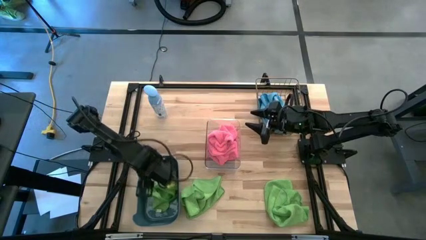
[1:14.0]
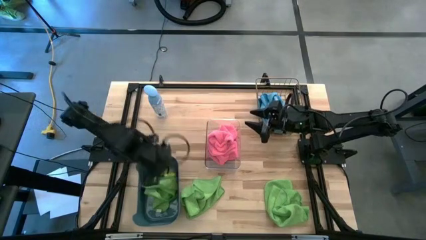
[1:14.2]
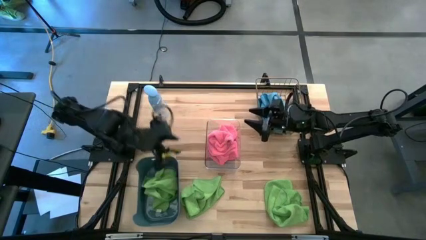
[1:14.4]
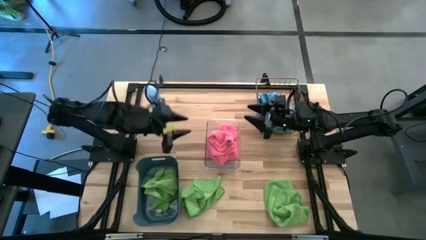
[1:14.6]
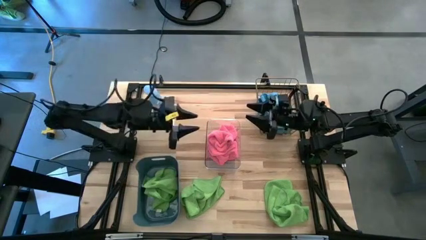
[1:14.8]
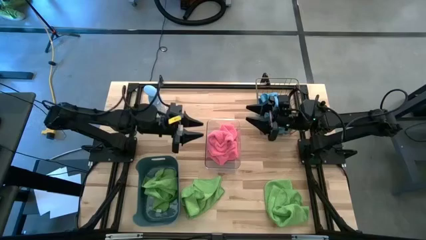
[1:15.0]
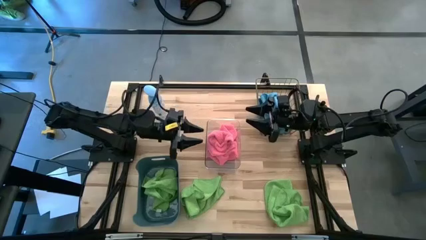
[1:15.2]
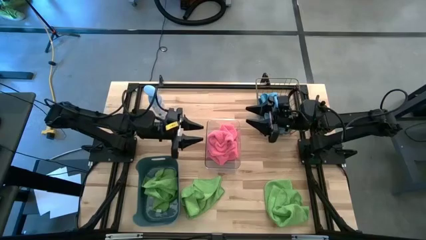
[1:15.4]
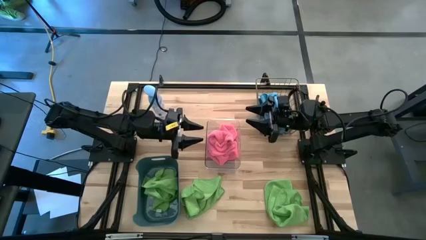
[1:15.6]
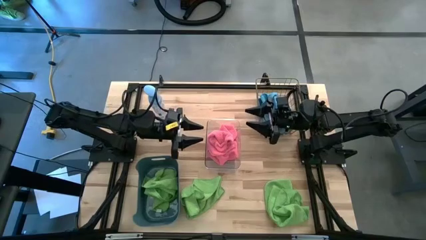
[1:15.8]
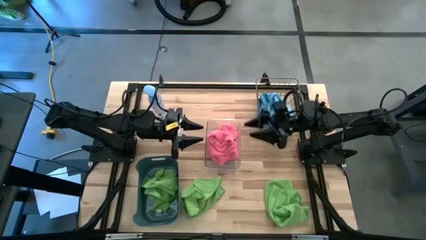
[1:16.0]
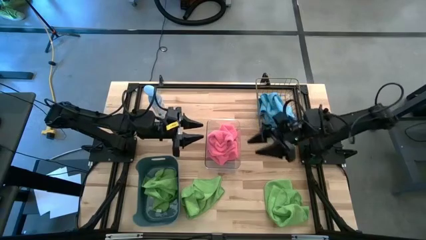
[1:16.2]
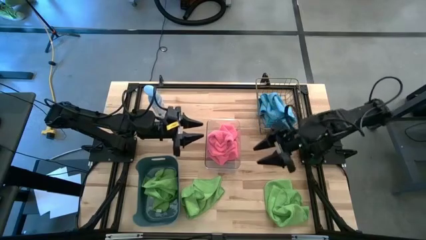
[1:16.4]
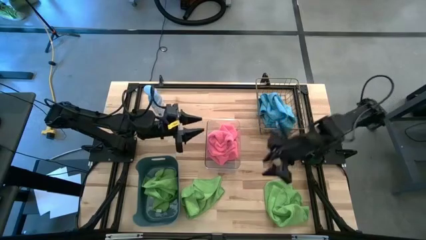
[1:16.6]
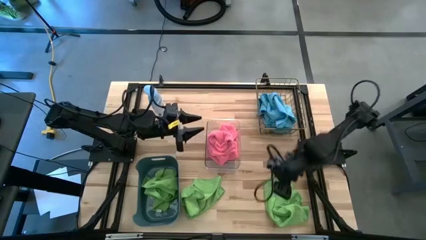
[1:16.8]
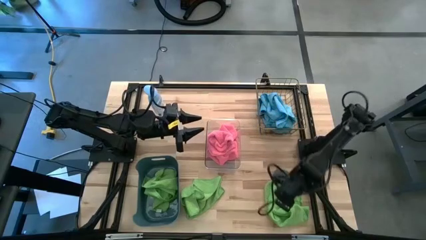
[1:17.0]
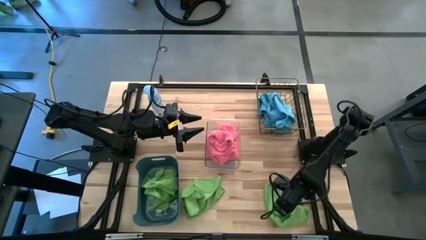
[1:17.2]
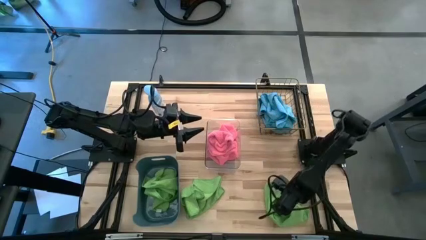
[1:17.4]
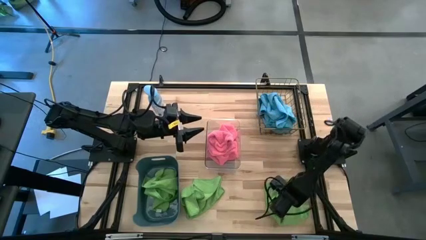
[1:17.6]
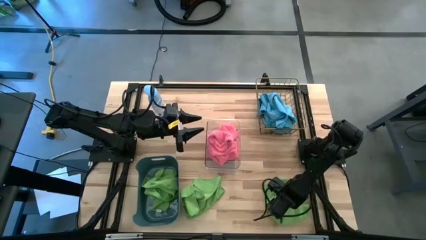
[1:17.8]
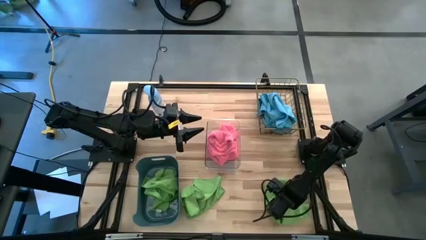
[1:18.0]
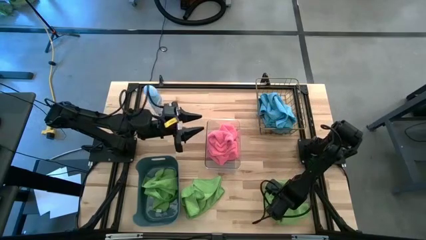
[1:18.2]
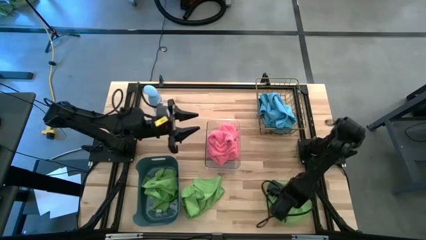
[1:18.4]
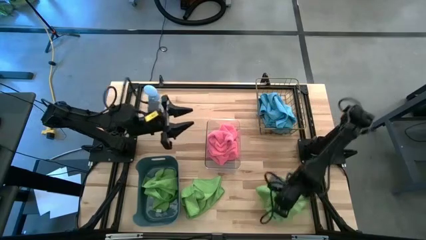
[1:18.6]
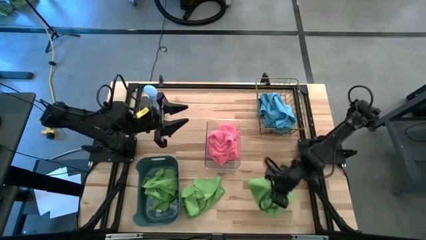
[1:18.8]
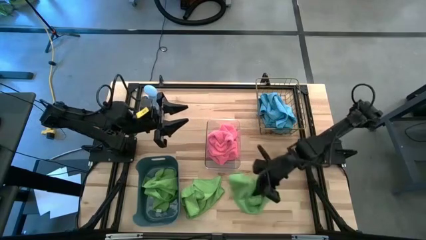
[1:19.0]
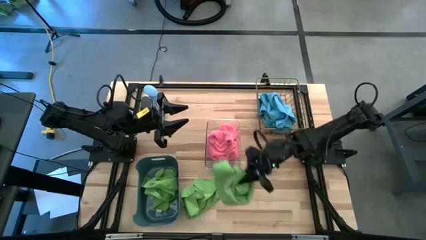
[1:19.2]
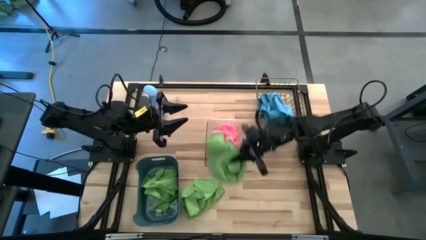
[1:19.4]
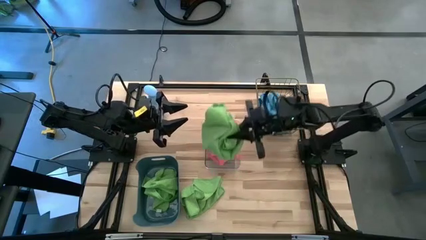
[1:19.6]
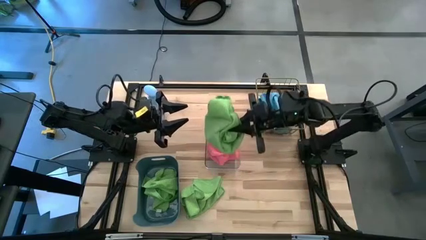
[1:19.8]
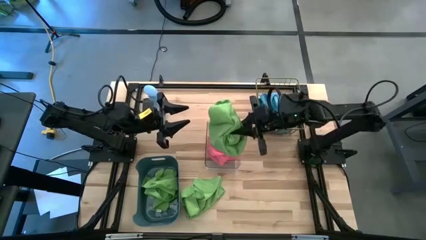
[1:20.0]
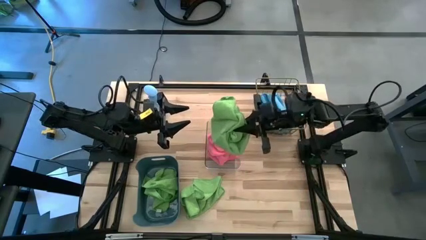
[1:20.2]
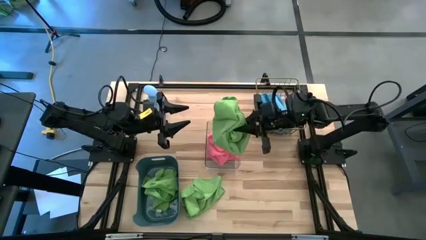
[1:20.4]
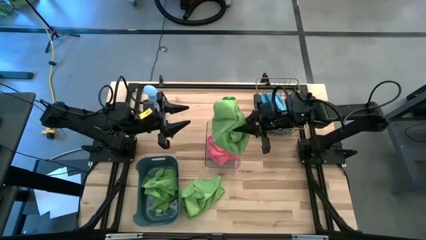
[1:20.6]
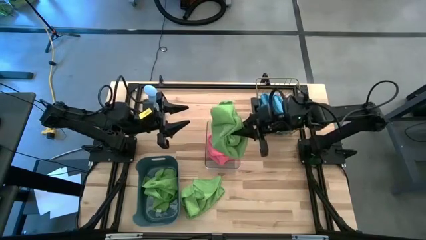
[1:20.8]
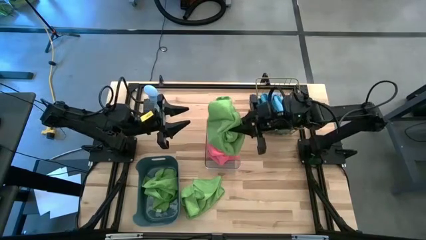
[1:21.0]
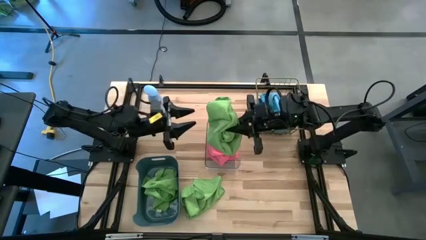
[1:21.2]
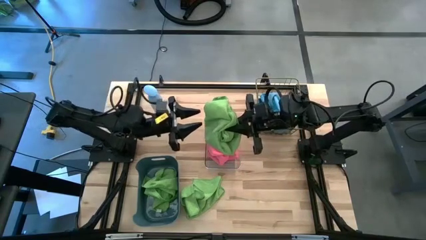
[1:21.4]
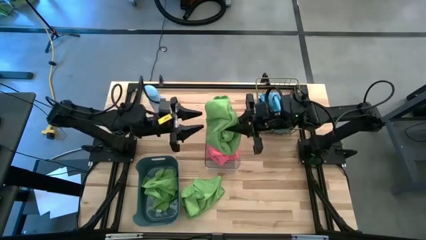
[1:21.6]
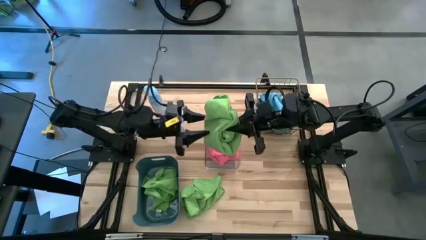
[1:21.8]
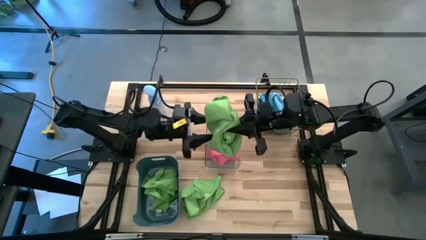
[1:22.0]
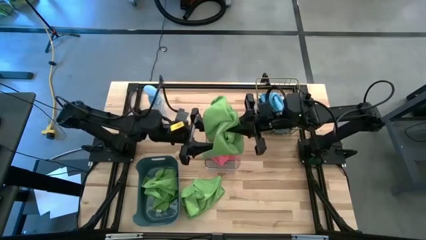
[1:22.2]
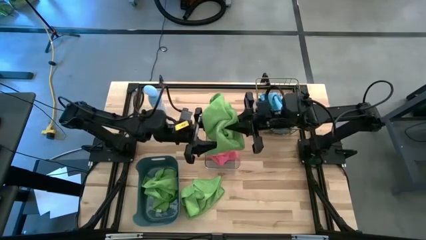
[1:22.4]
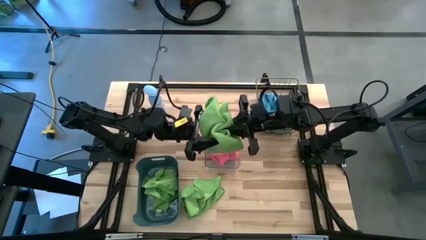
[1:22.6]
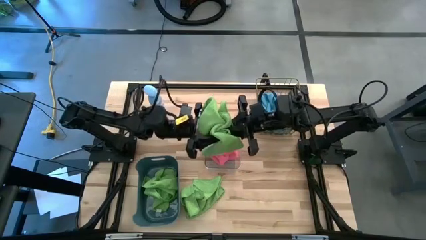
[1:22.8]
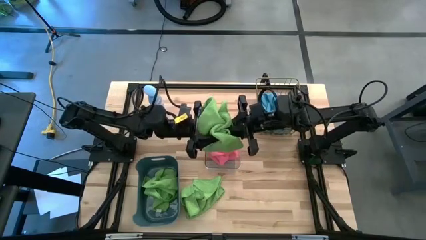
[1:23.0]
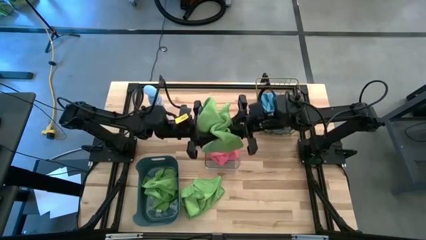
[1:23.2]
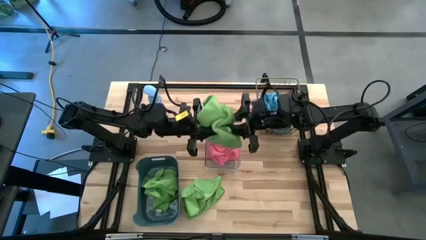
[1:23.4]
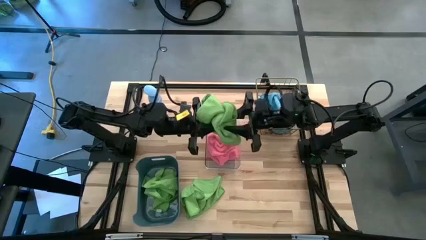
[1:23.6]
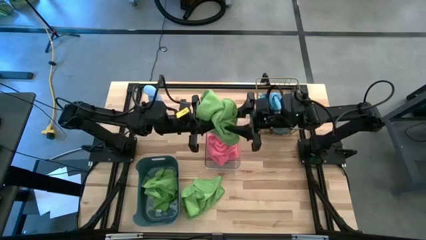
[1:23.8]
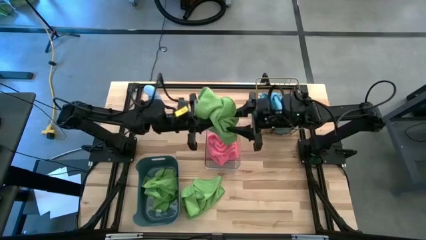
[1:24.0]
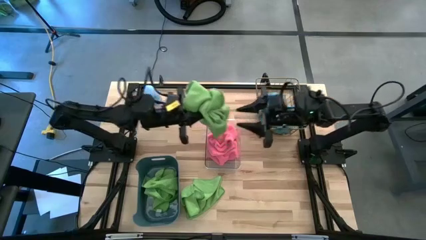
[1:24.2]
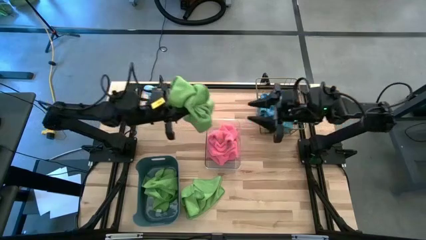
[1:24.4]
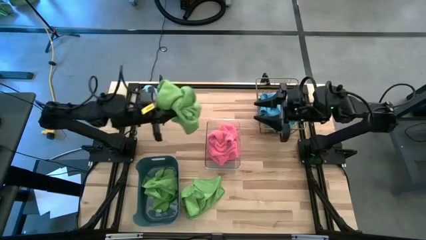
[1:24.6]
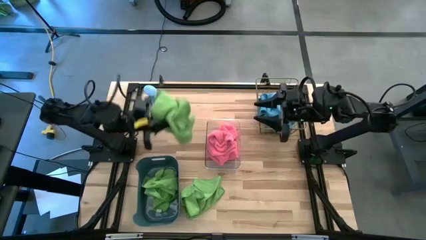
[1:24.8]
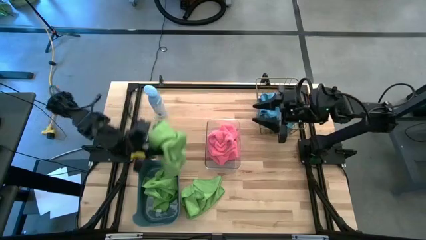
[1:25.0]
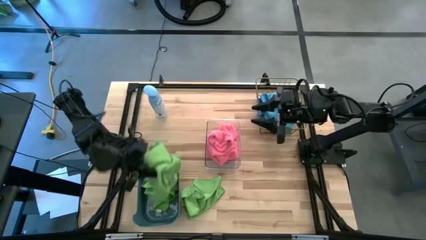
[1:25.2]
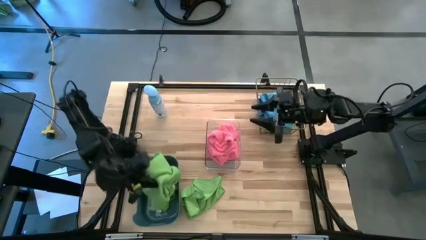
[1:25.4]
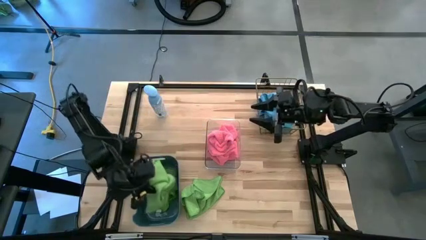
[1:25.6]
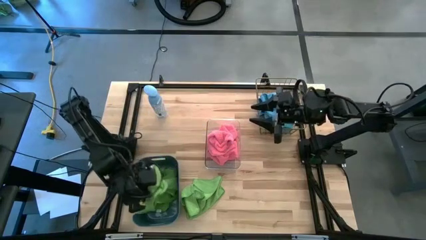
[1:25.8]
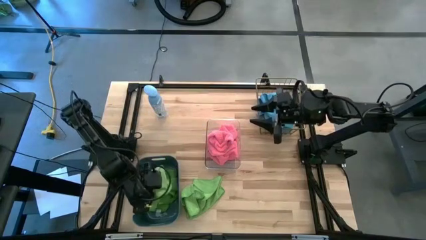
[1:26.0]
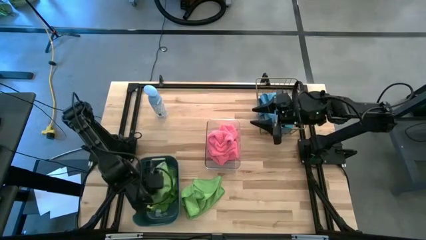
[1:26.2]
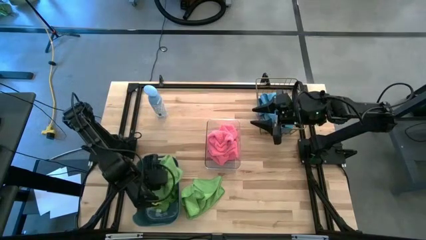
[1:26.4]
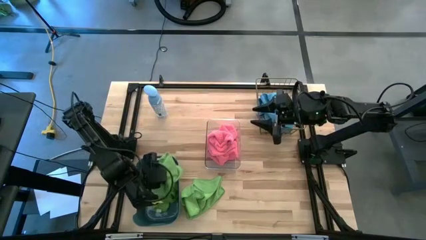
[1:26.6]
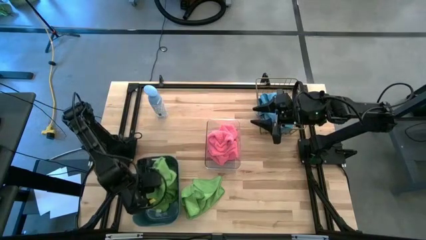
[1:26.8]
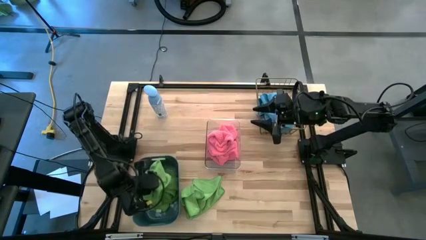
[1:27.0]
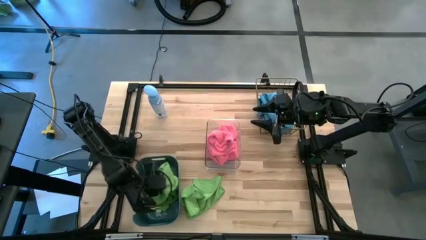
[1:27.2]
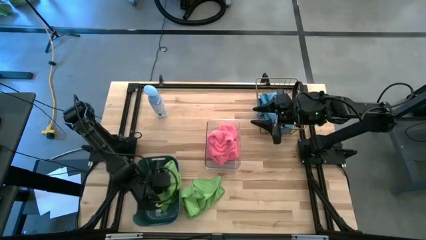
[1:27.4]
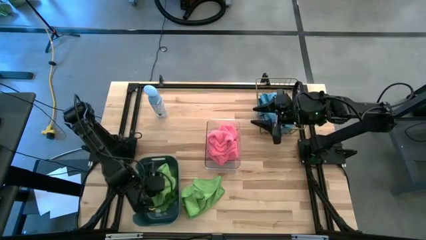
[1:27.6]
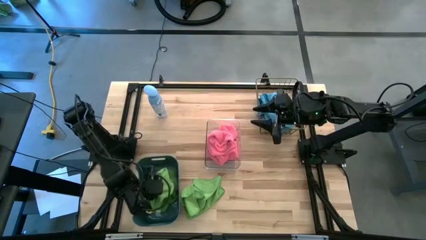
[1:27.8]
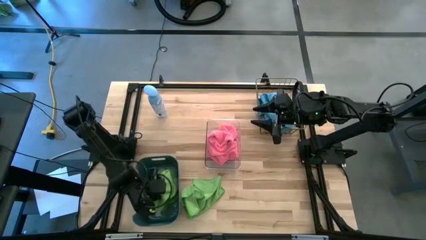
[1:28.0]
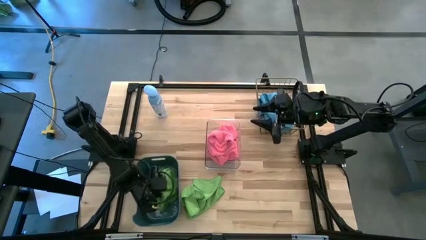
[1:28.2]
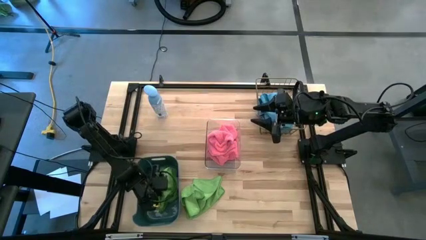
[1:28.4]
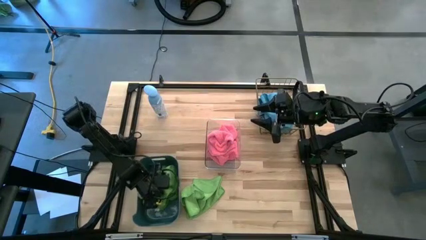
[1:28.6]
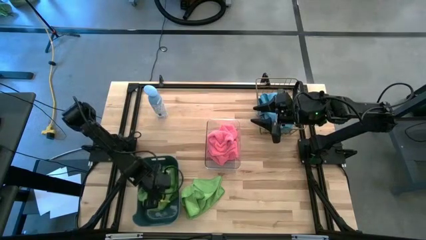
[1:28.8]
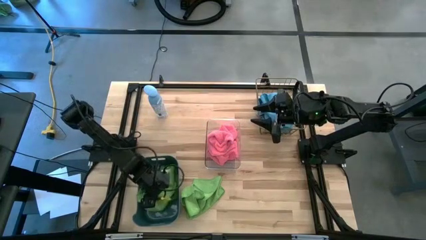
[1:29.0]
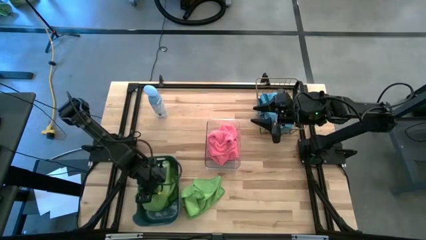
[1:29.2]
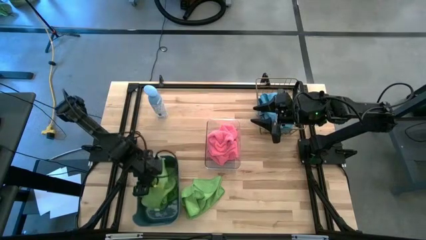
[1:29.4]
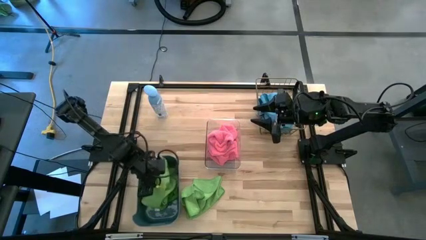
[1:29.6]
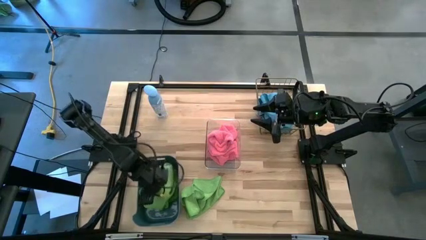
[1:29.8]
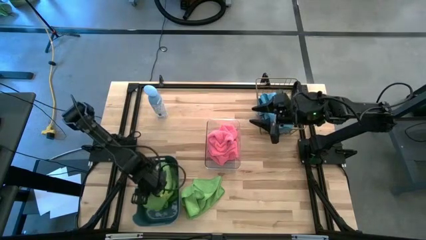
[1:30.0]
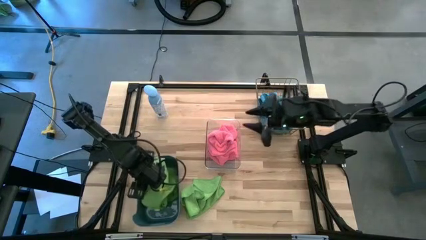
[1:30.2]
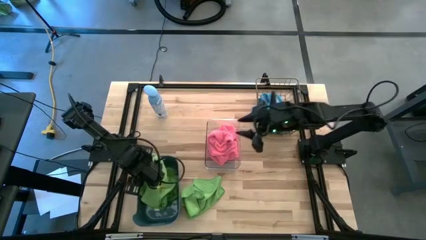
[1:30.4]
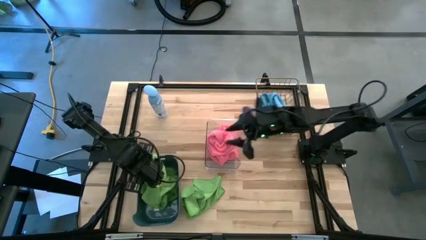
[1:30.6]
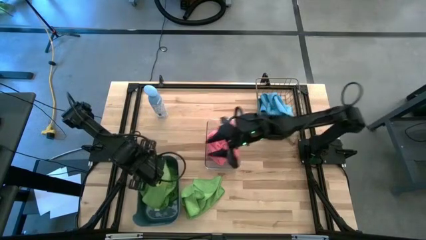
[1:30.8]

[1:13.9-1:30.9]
Task: Sort microfiber towel by color & place in baskets
Put the right green microfiber cloth into the blue bin
